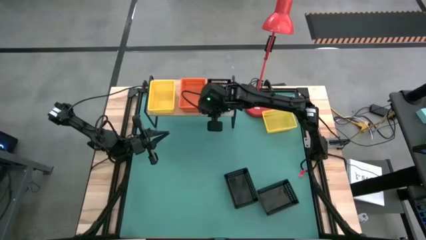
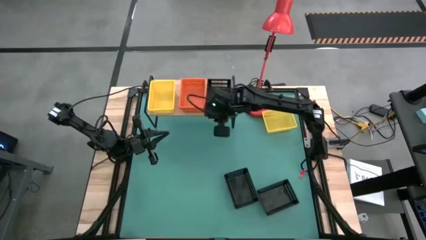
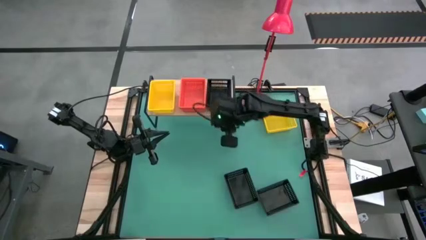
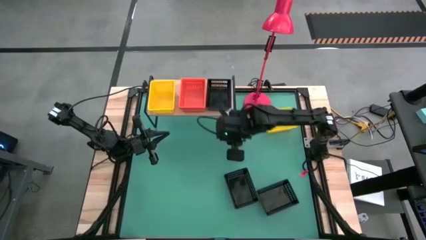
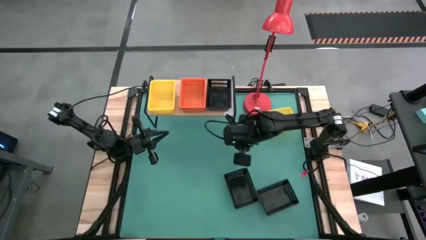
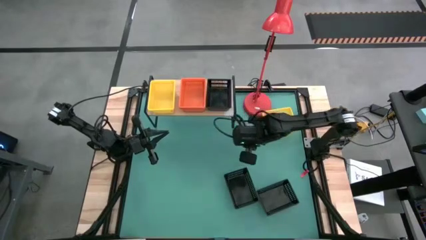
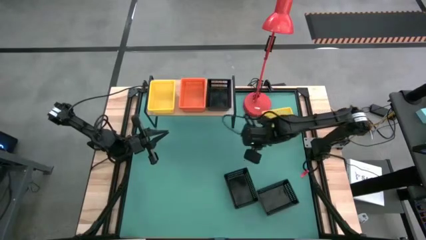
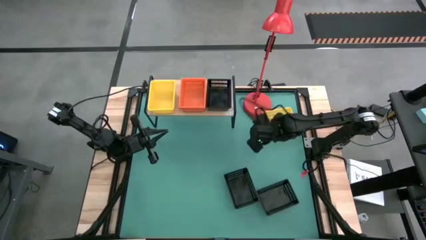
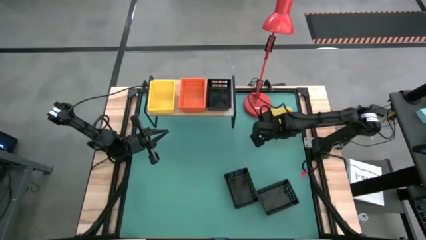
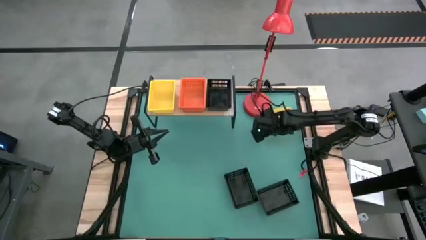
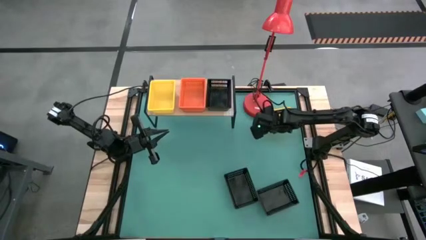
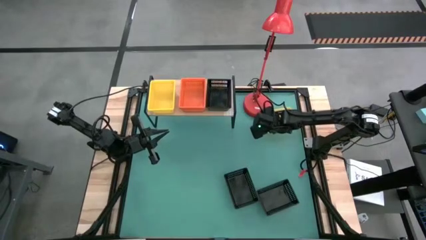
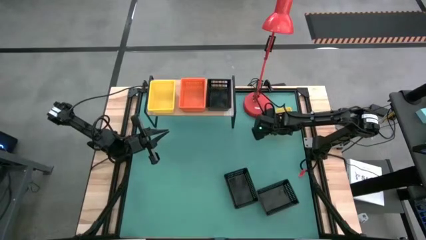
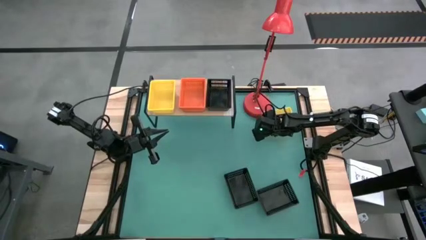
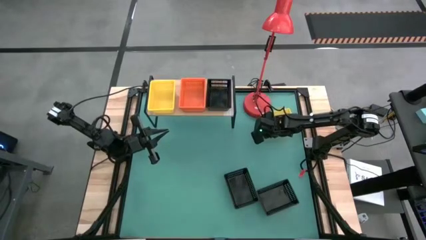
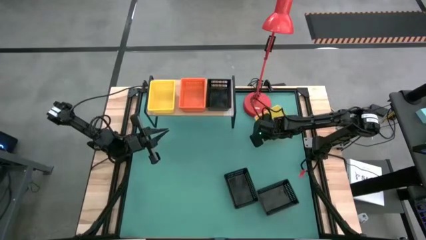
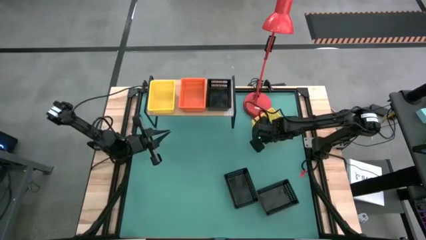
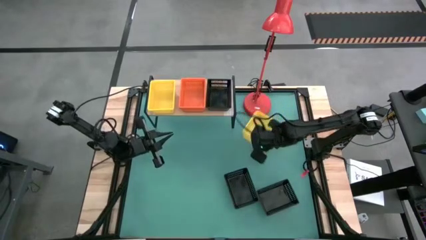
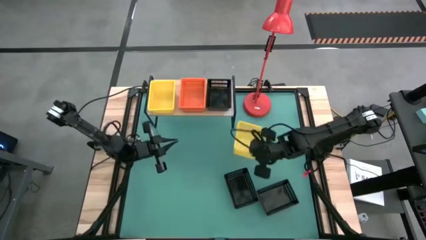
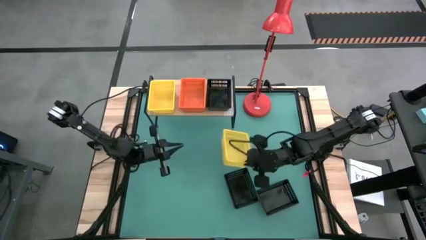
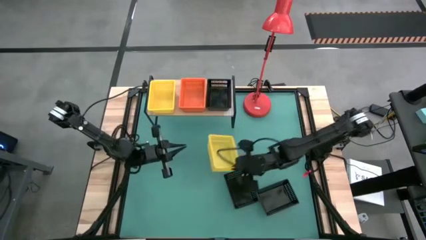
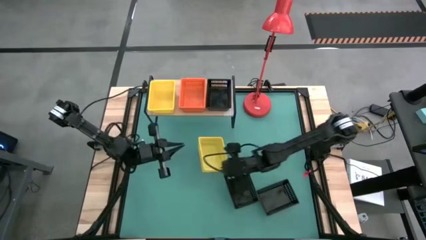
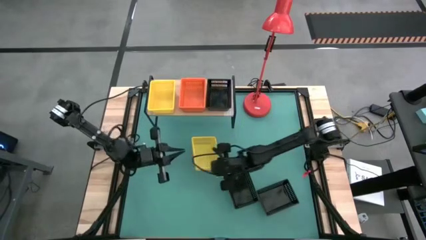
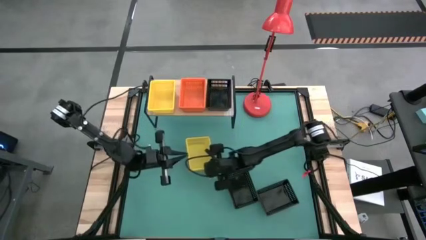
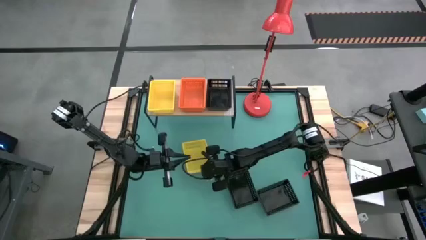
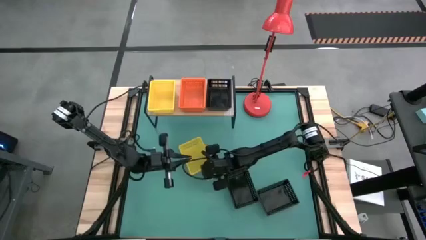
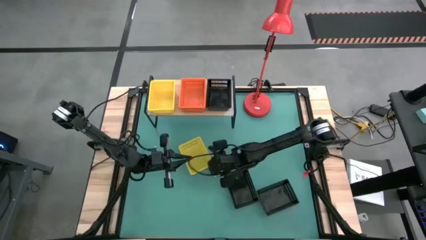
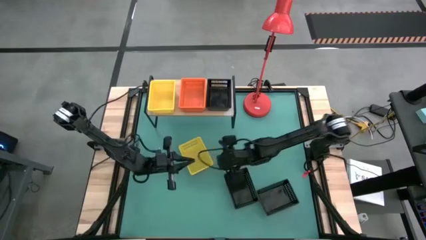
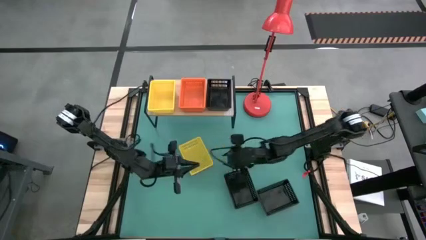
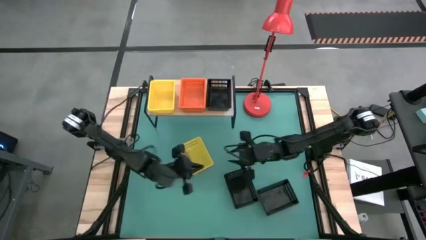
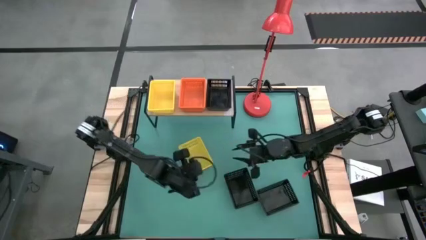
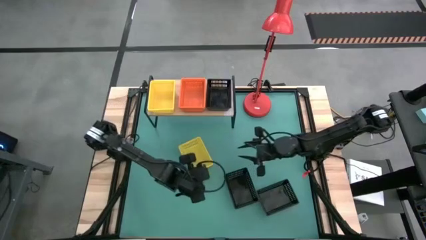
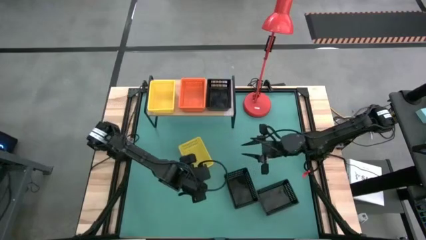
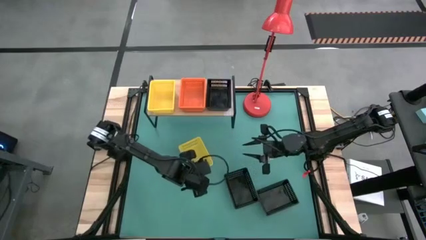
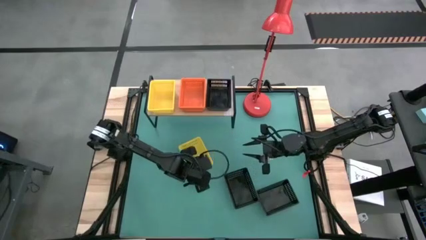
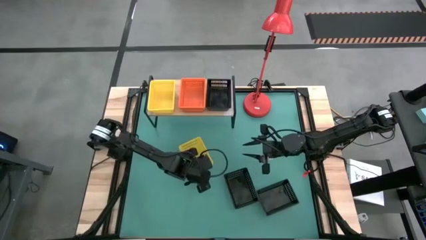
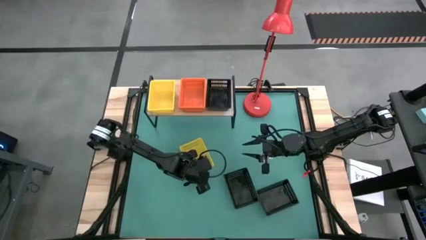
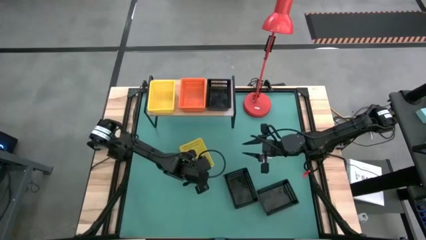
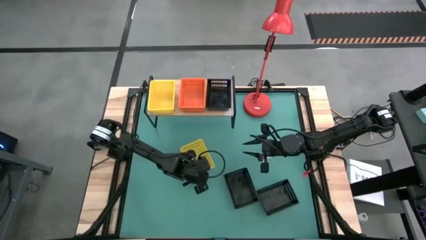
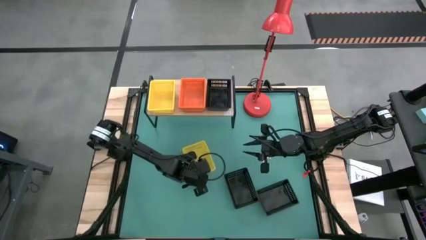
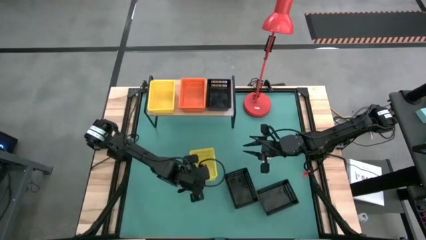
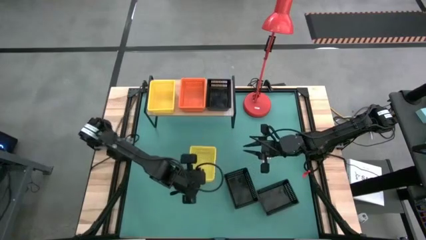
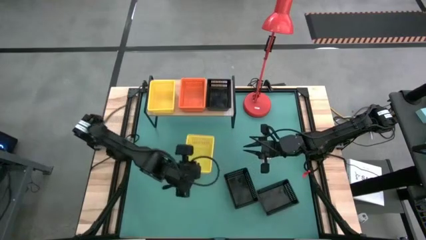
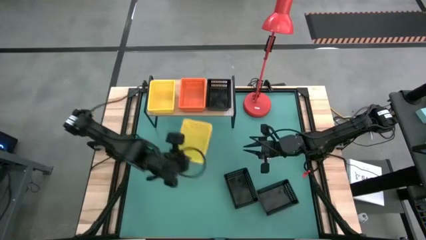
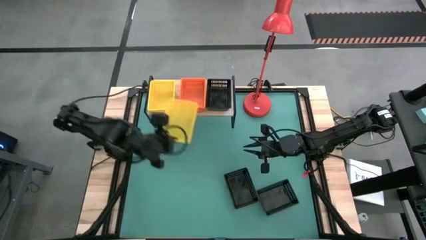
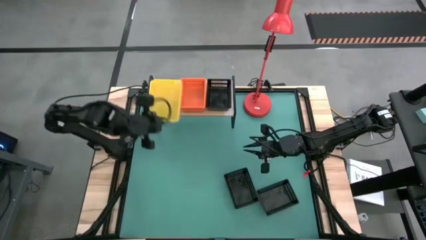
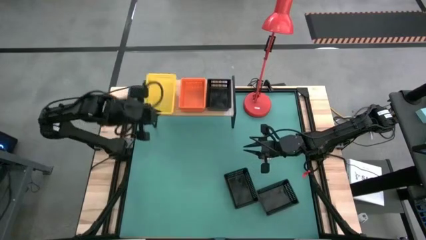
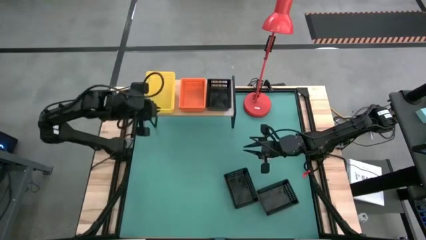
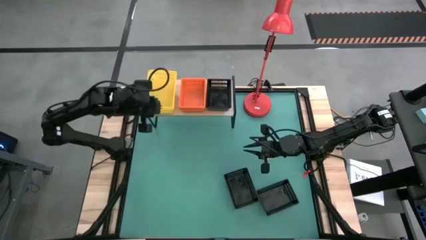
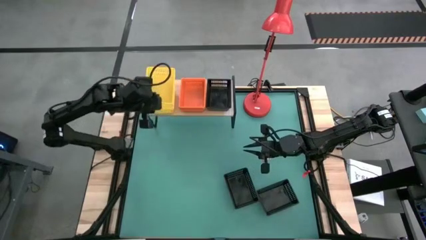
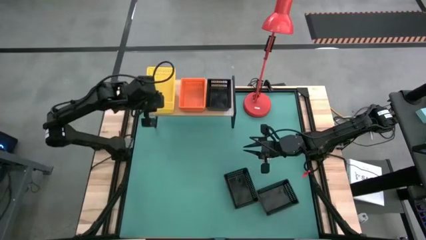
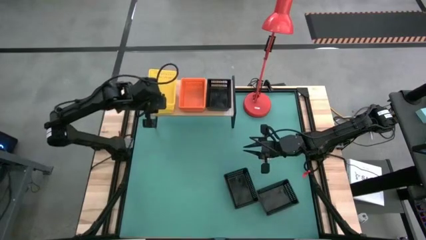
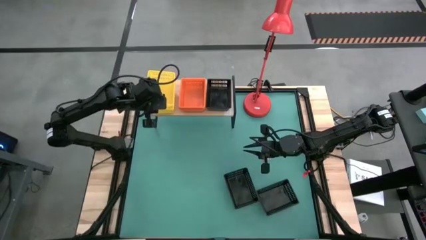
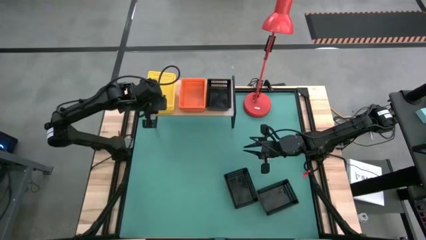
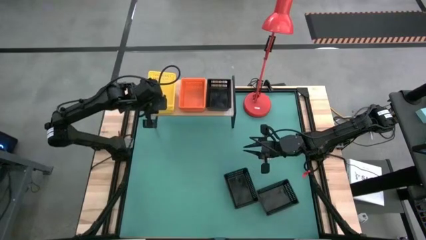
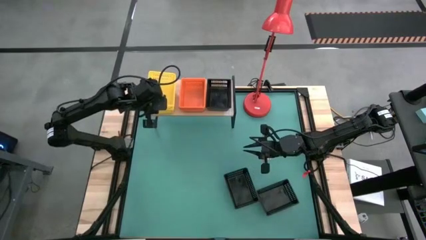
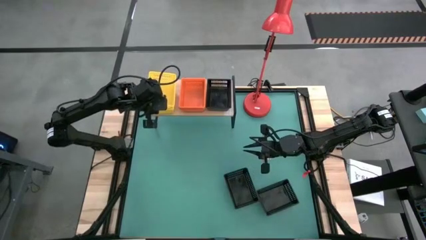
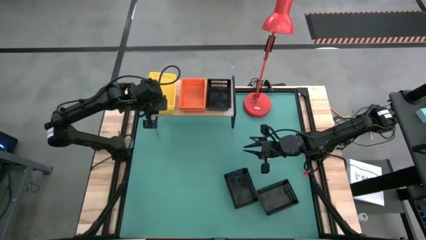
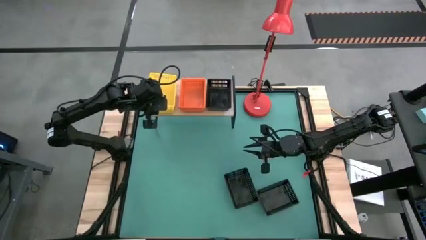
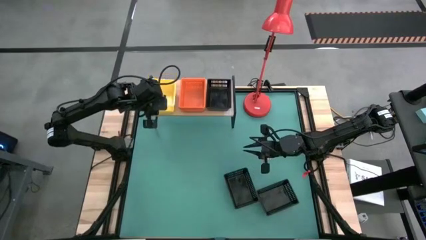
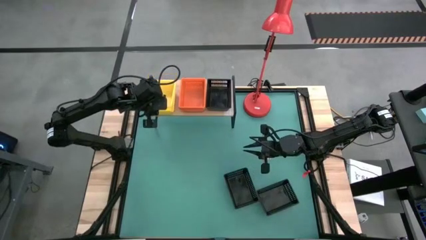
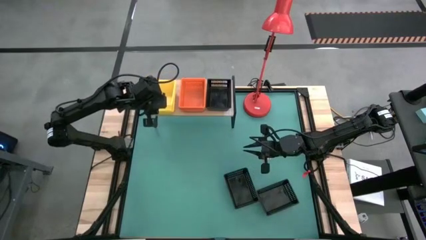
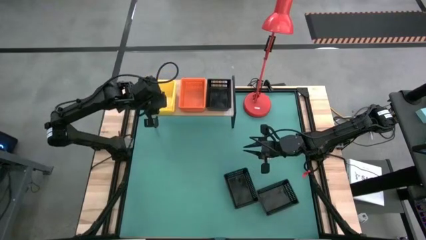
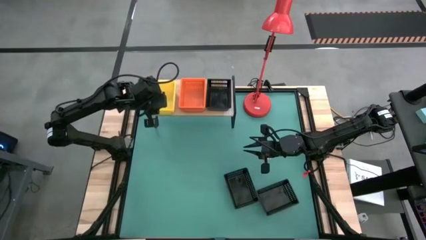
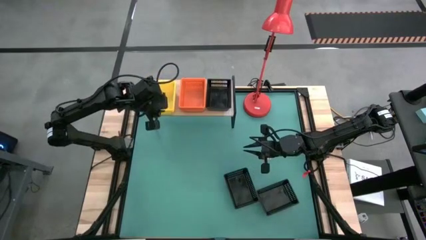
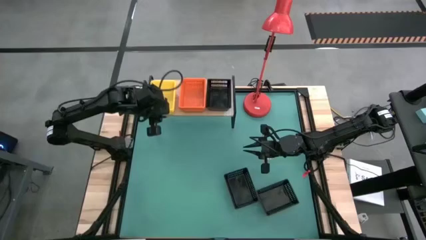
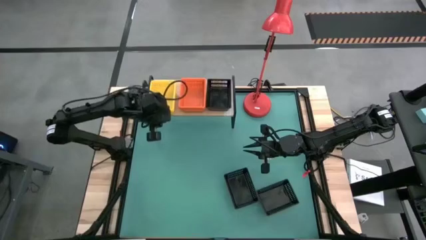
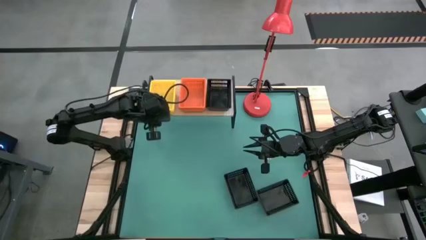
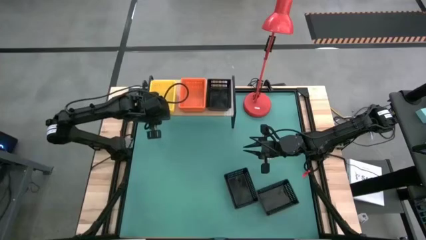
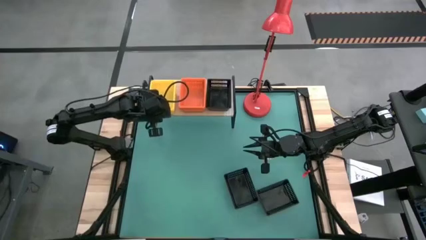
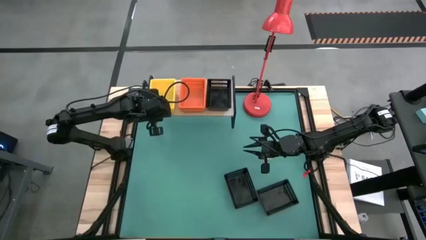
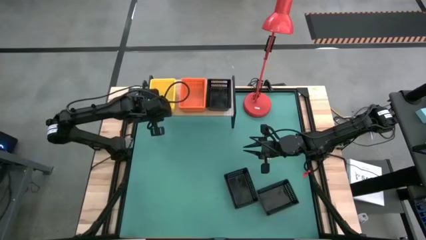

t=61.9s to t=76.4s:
Task: Stack baskets on shelf by color
Stack the yellow bin on top of the stacked yellow bins on the shelf
